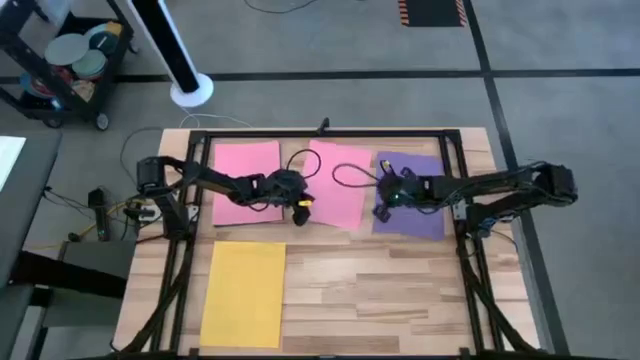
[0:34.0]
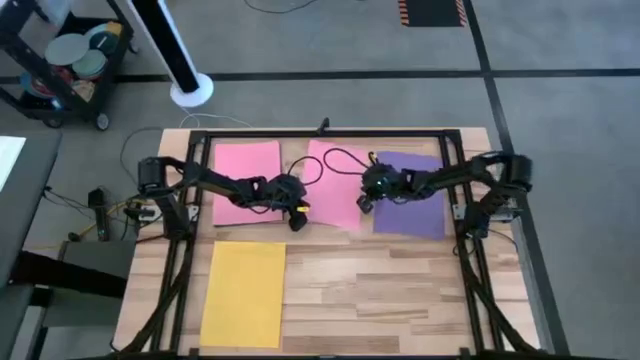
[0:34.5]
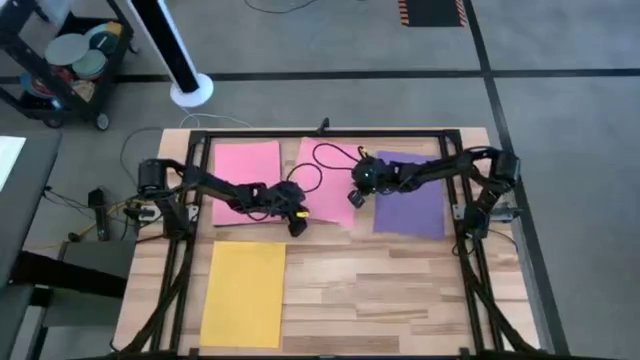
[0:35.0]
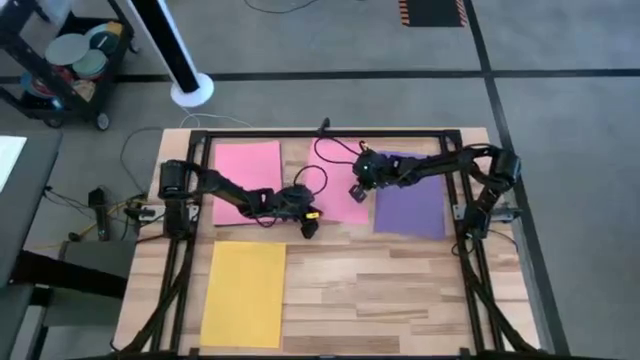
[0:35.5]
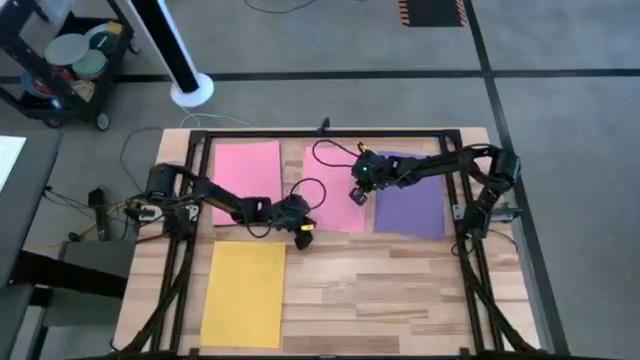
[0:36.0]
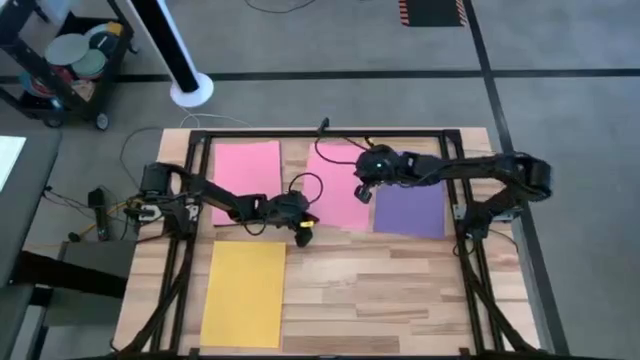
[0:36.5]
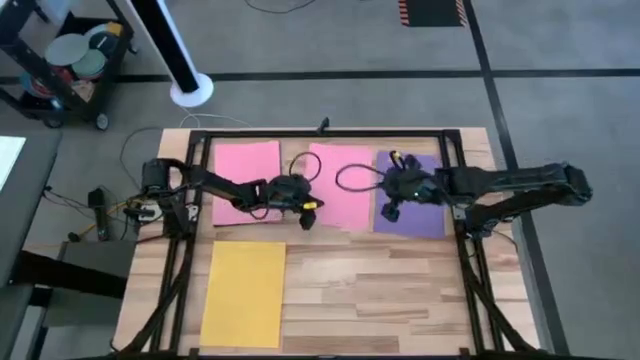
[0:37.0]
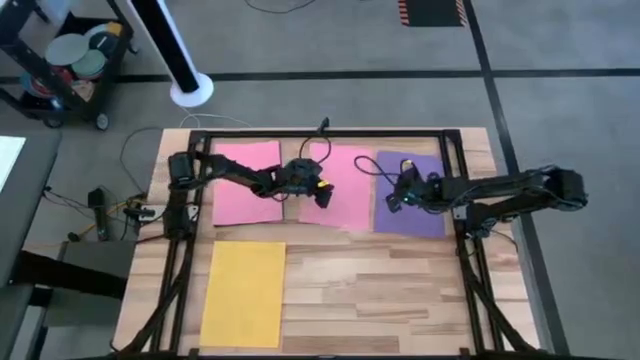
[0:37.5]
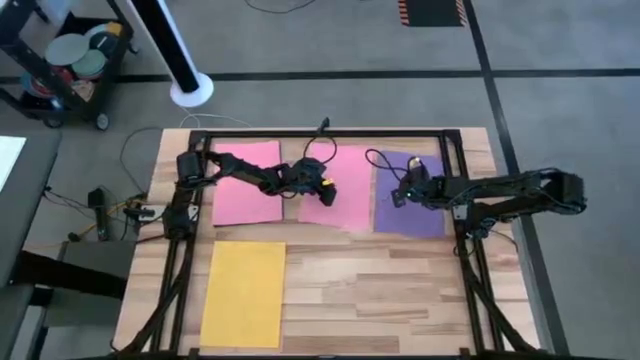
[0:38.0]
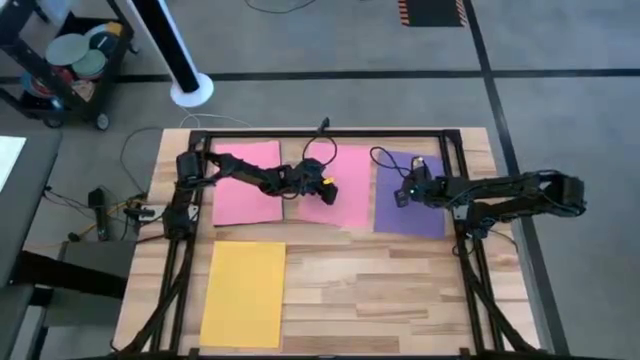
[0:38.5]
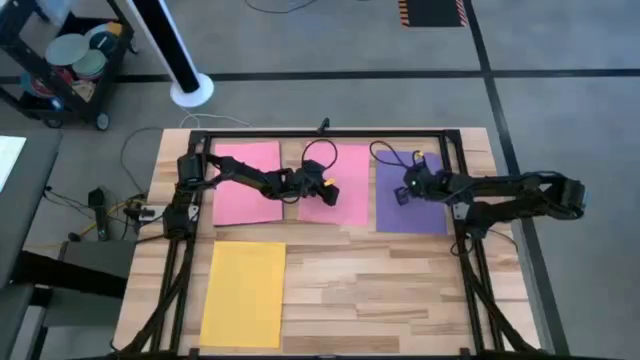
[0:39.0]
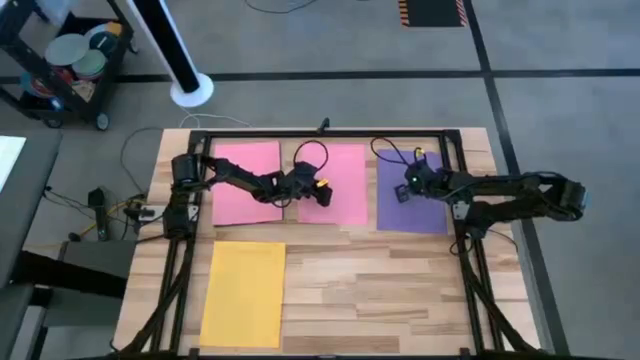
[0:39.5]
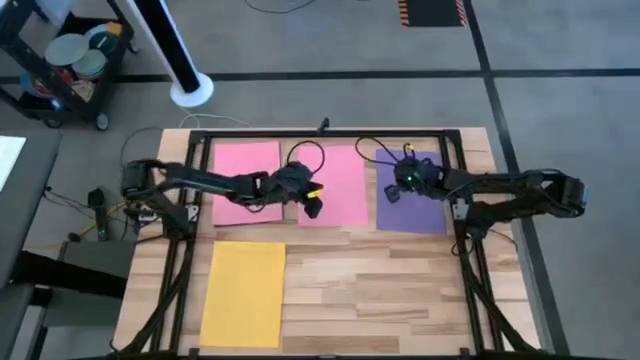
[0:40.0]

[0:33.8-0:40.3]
Task: Organize paper
Adjust the papers

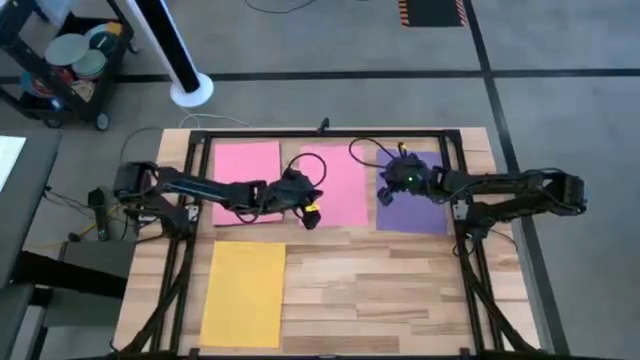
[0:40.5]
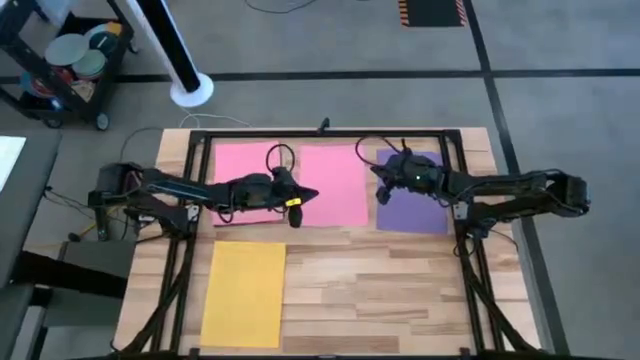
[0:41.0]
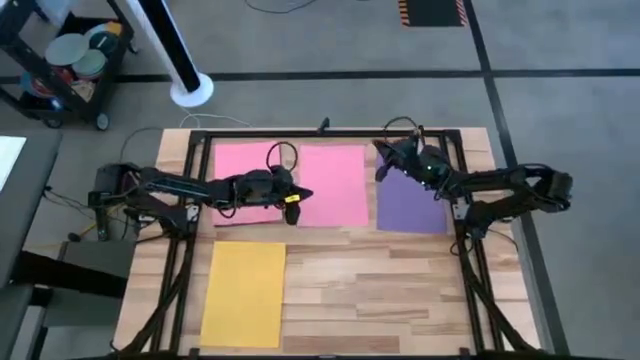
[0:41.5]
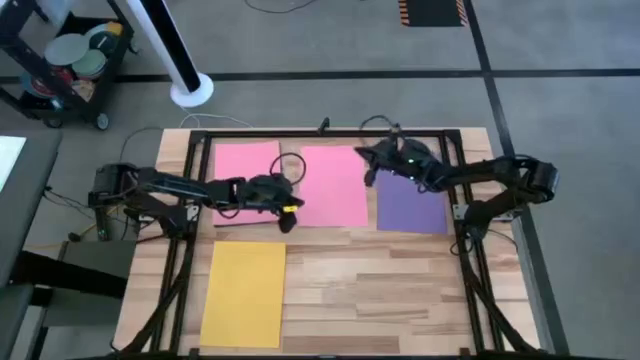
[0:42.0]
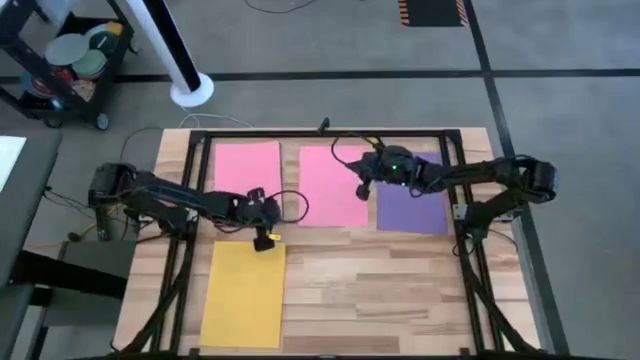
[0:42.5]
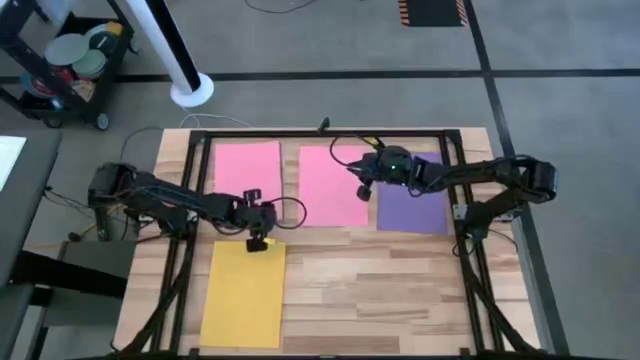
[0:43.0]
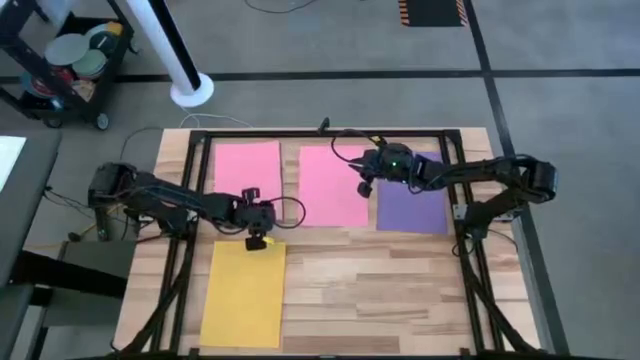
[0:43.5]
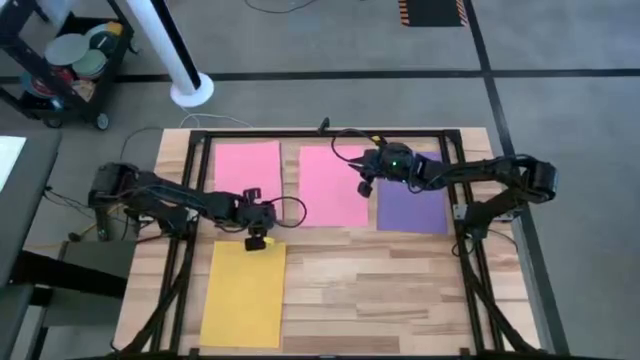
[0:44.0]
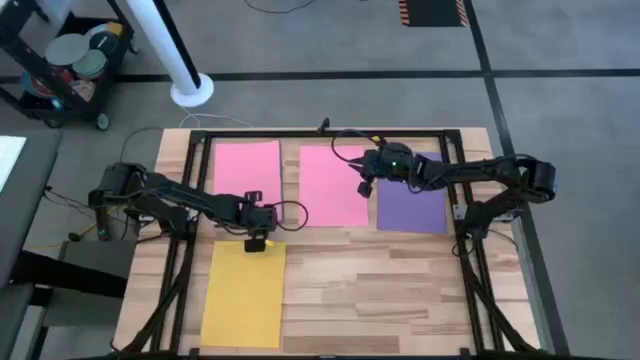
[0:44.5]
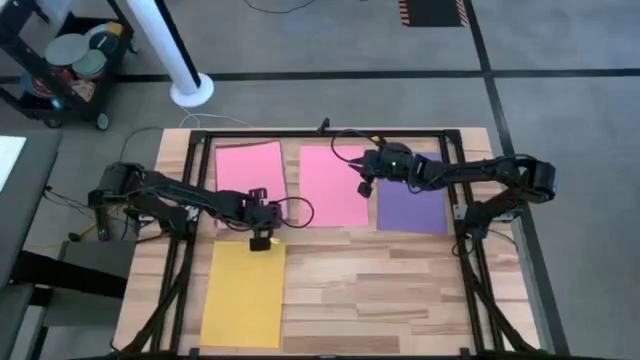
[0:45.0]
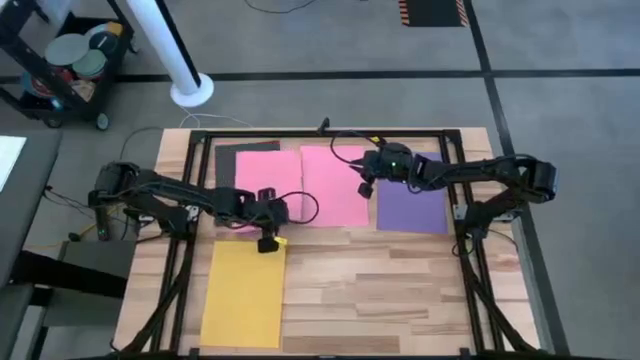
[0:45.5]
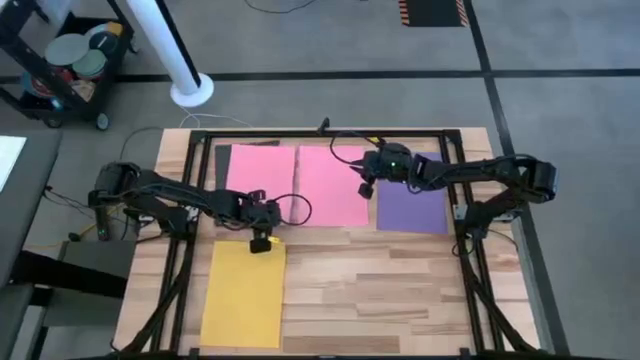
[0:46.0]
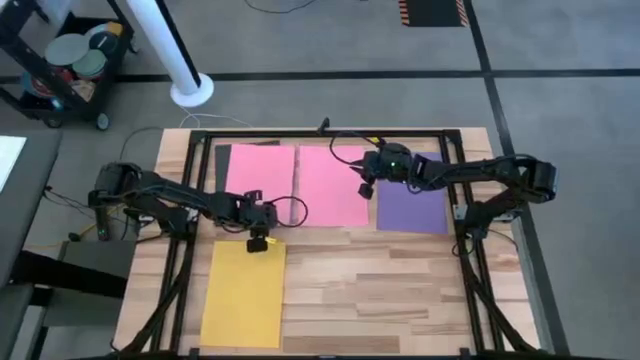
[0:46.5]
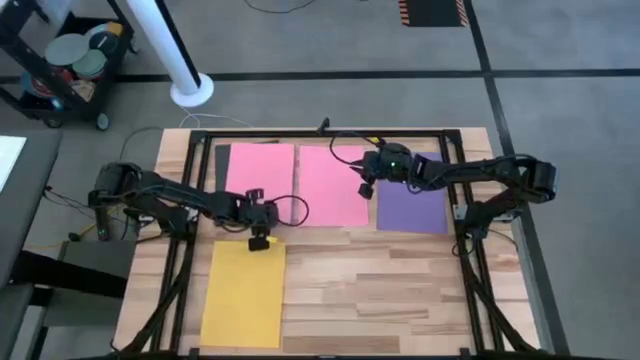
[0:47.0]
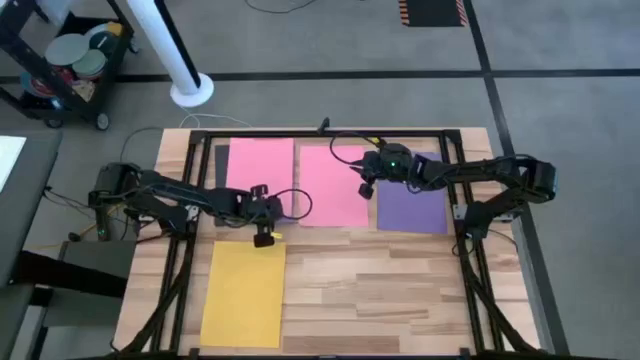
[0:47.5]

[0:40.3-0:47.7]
Stack the pink paper on top of the pink paper

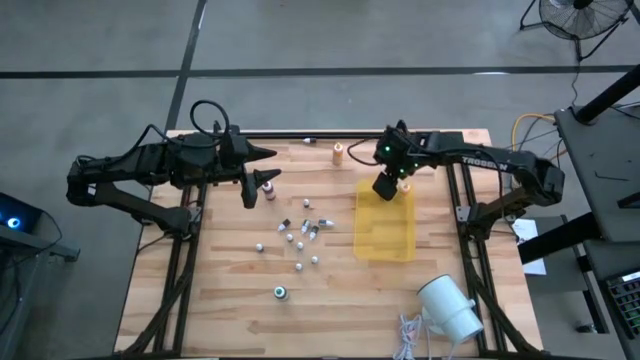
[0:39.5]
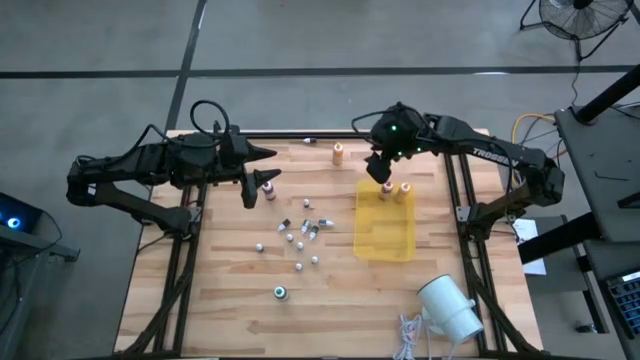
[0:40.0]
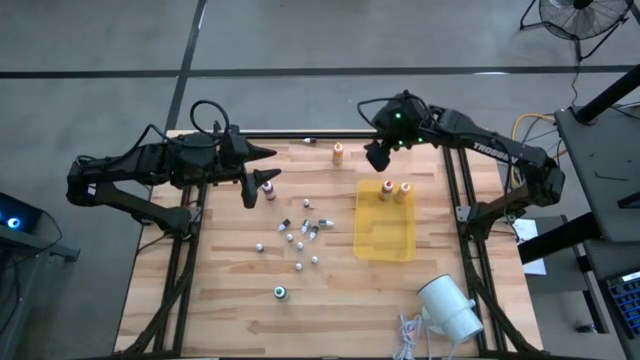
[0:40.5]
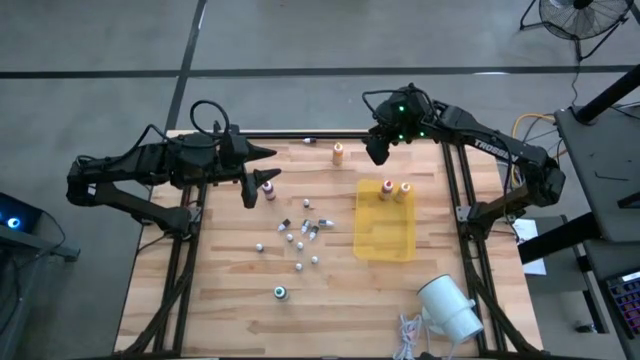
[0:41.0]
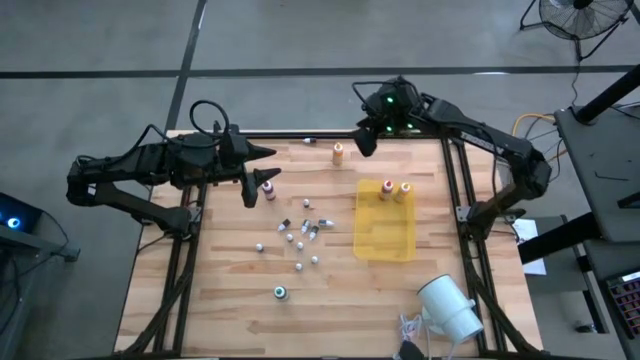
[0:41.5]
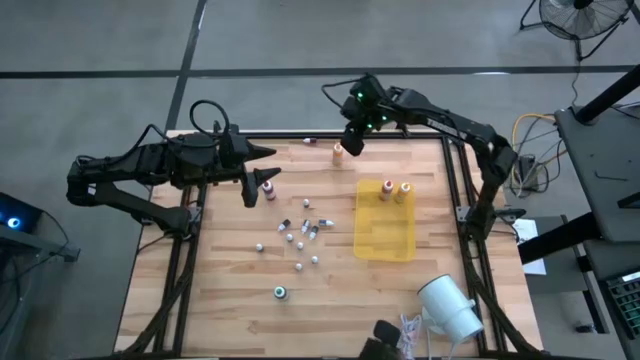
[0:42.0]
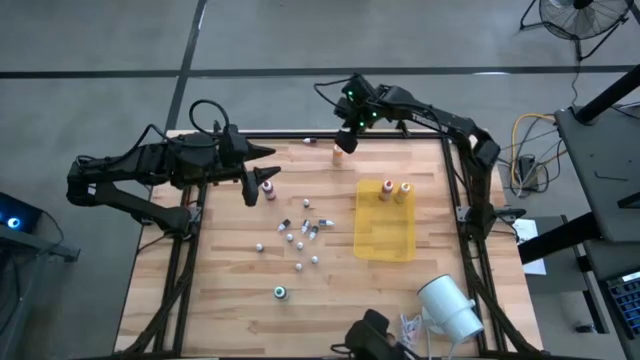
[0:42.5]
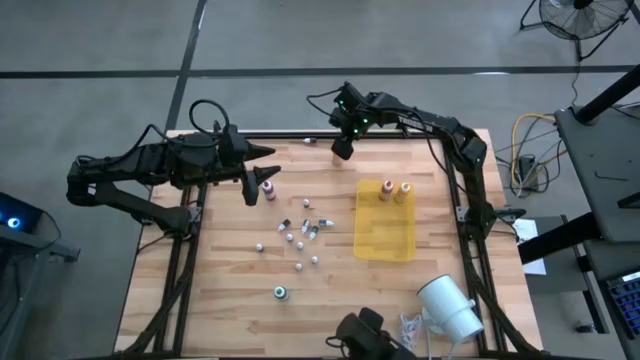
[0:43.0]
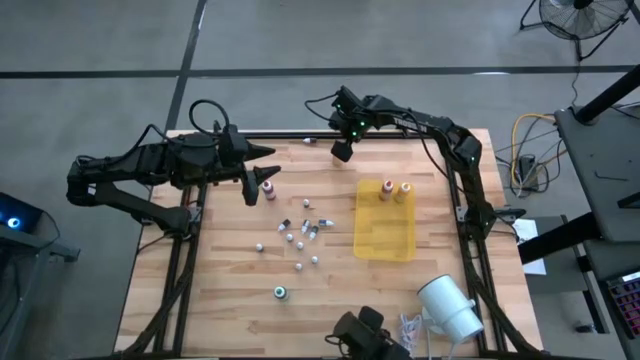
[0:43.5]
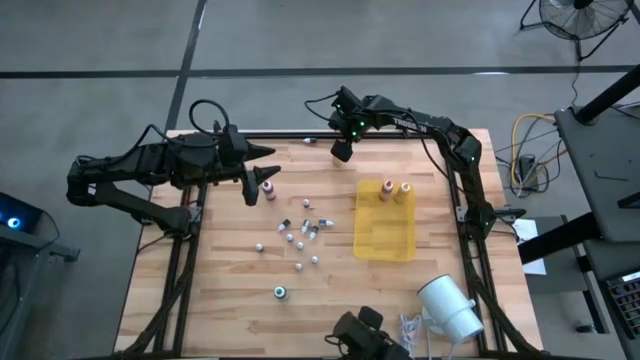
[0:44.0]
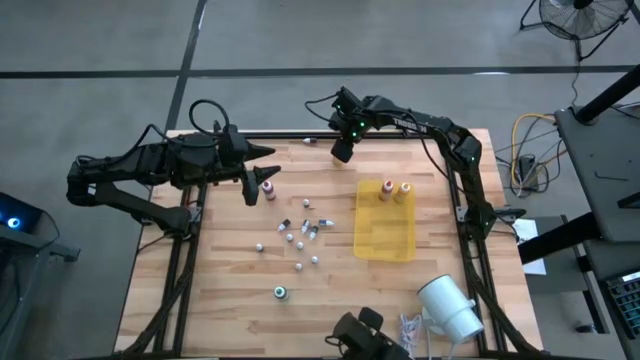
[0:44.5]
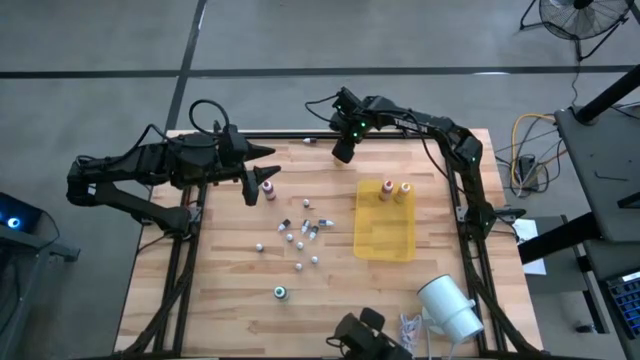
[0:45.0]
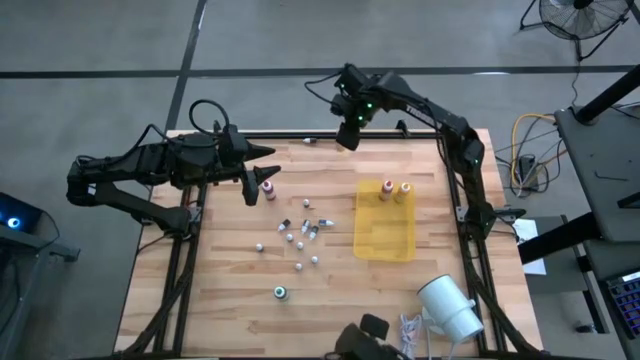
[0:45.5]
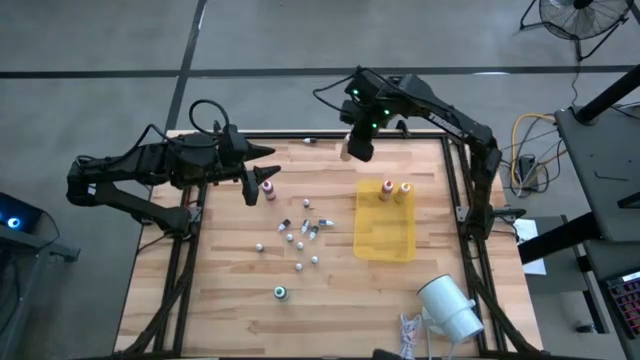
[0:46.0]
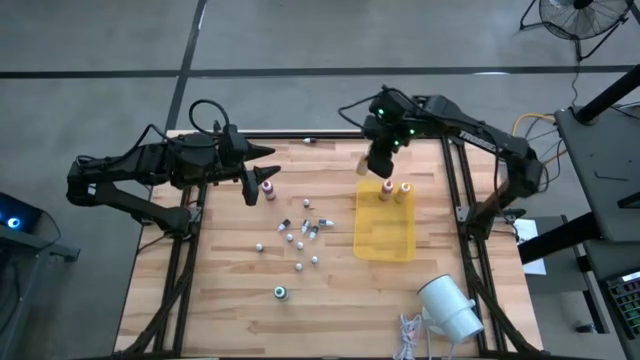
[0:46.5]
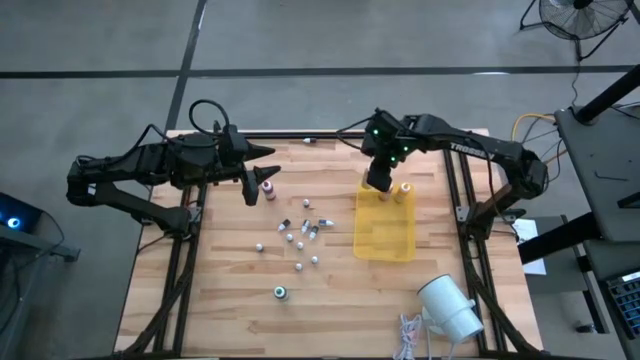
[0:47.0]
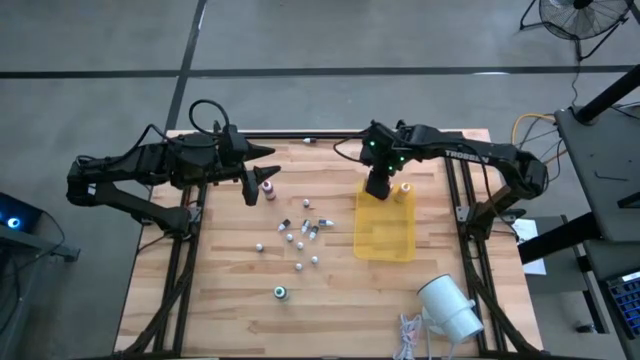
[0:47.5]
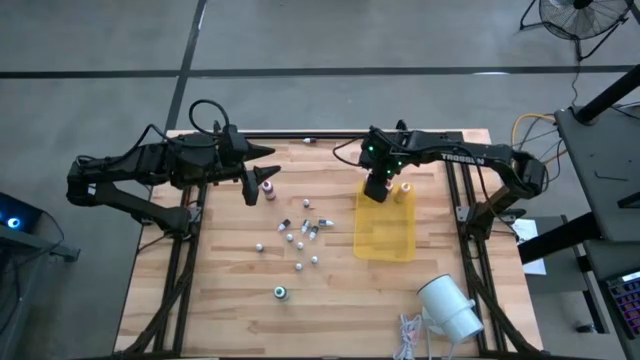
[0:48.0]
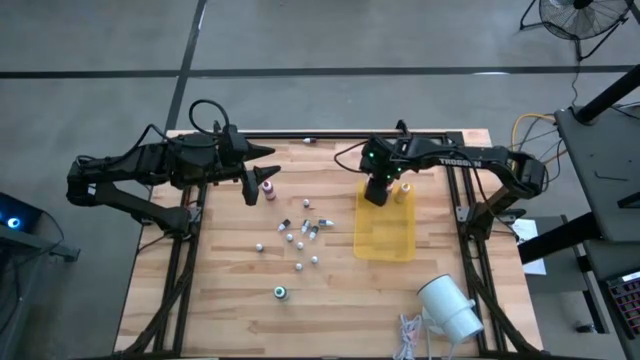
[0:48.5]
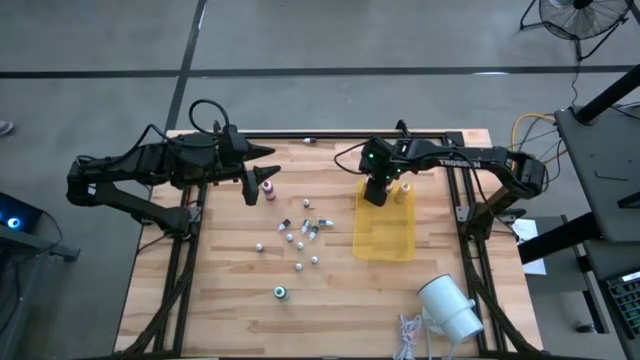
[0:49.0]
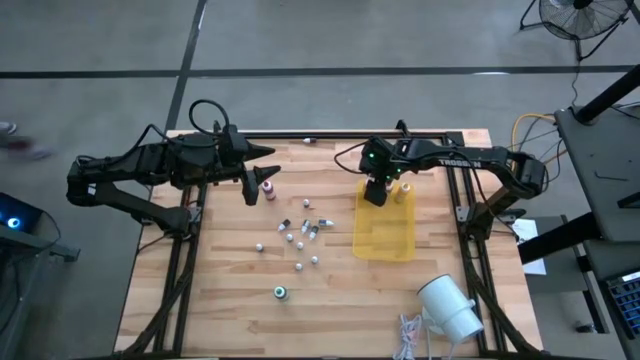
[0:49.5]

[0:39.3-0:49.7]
Task: Pick & Place food coloring
Put the big yellow food coloring bottle into the yellow bin
